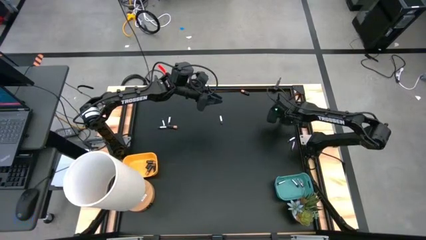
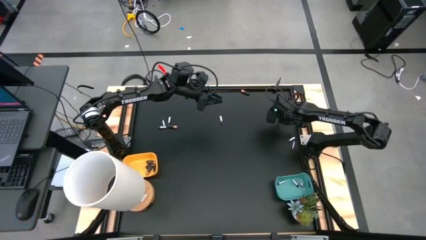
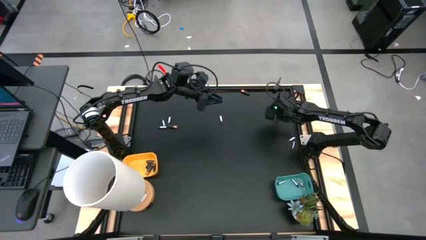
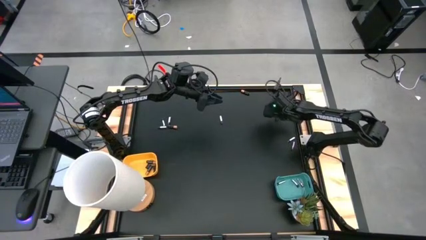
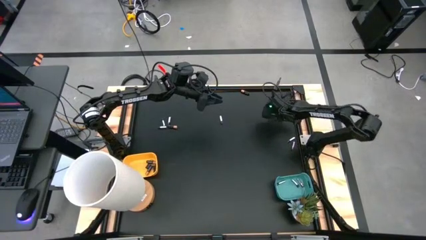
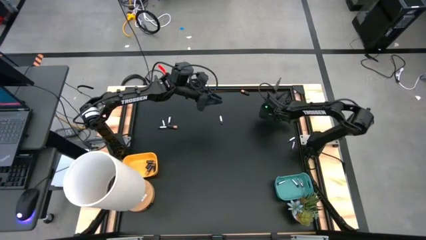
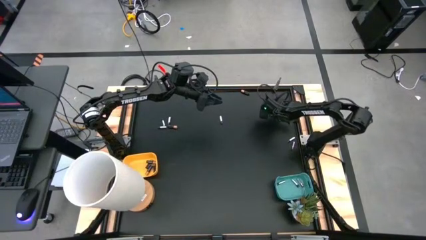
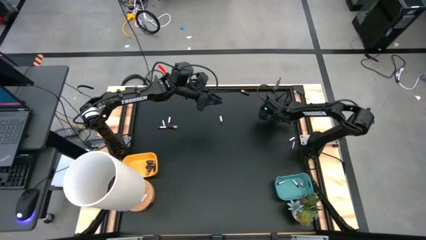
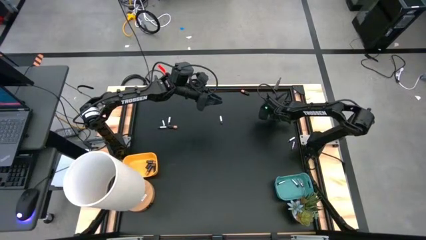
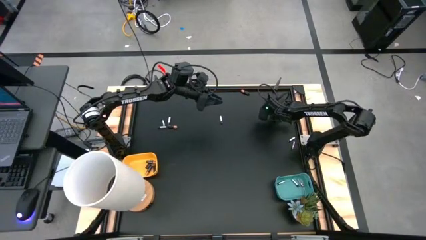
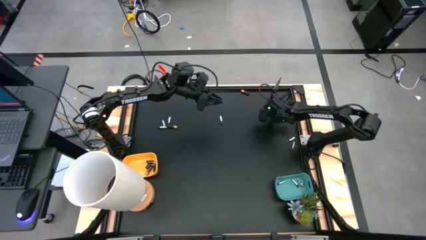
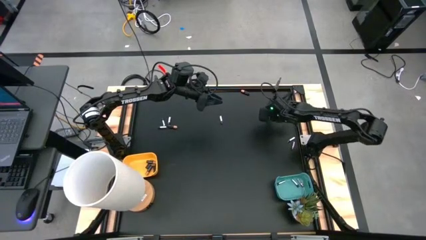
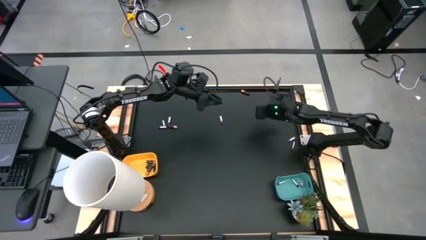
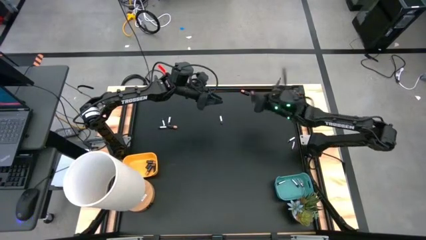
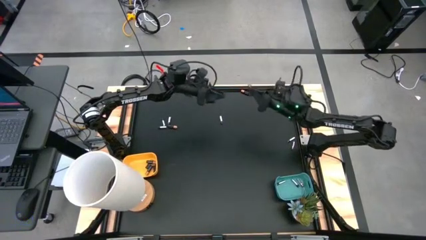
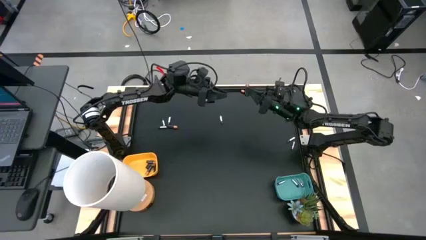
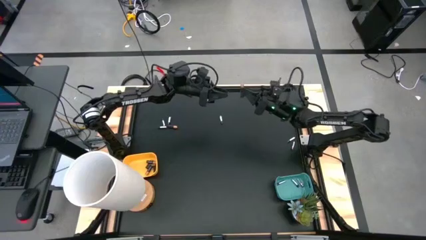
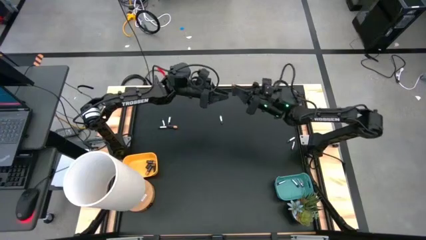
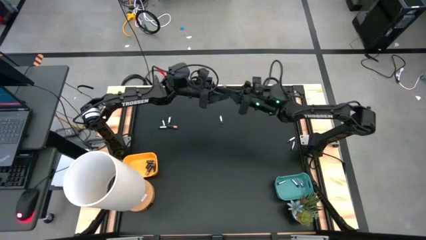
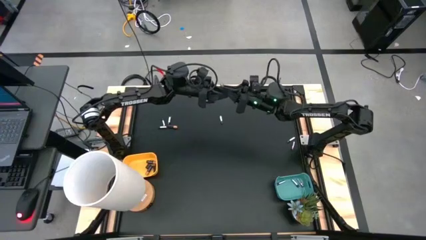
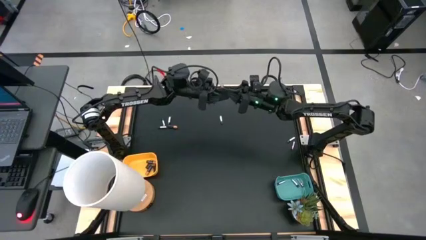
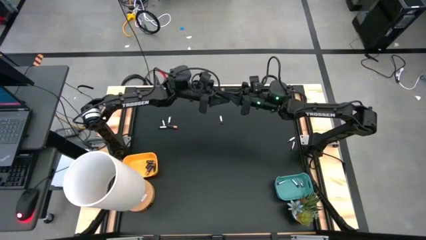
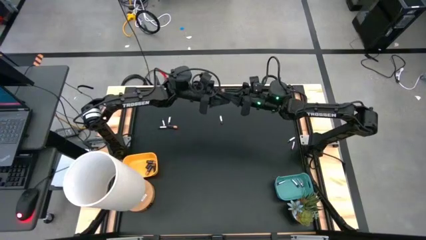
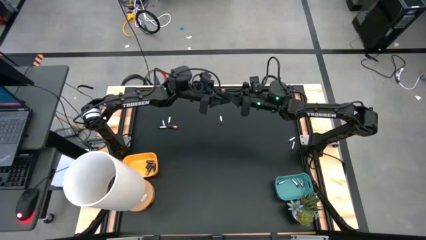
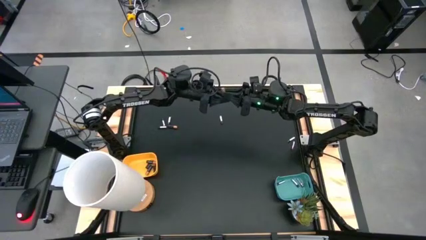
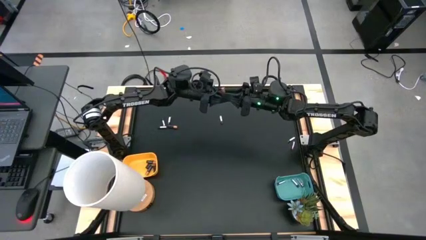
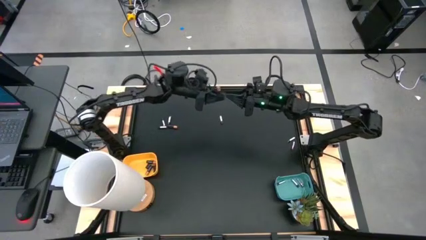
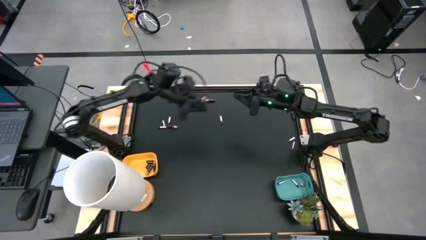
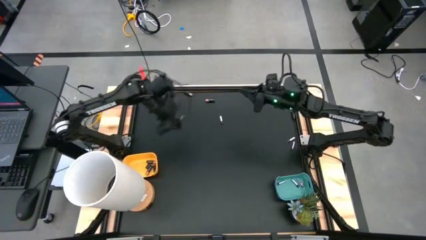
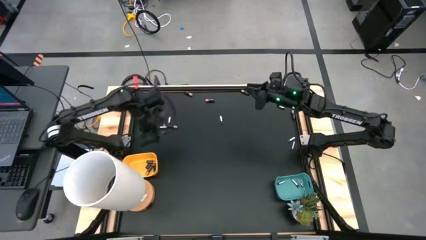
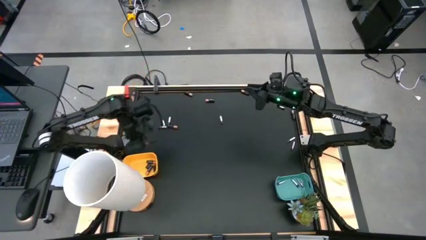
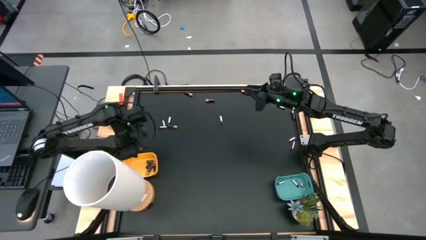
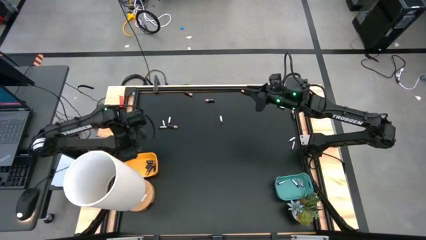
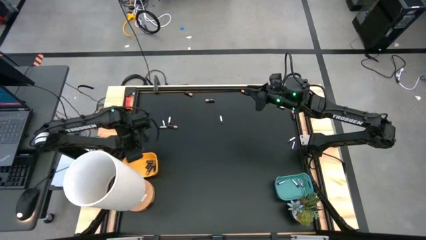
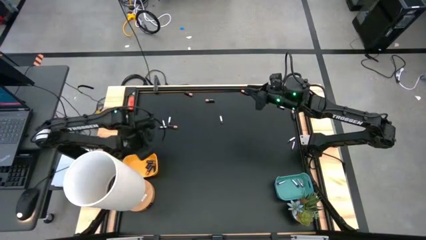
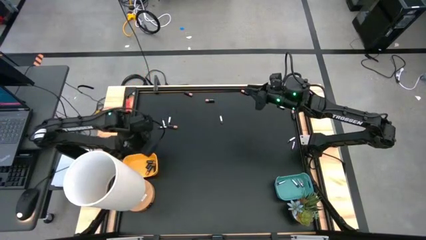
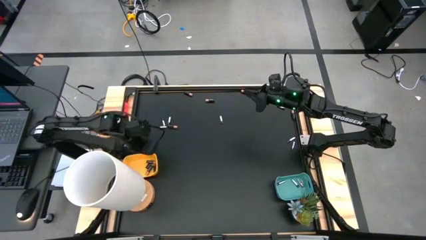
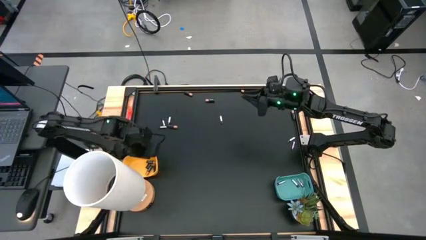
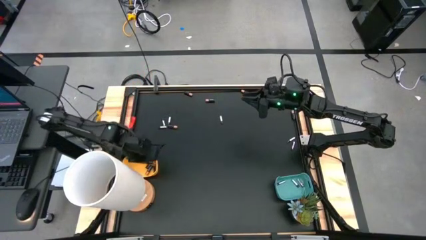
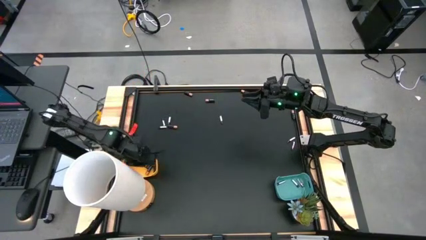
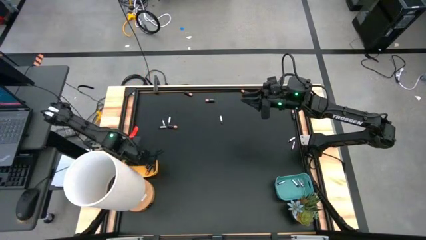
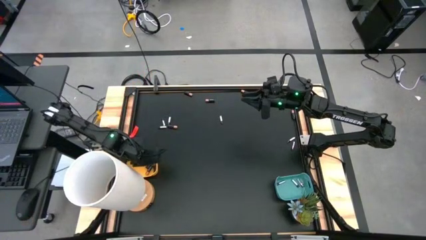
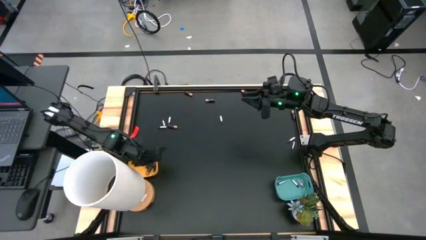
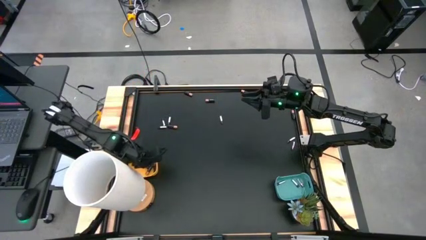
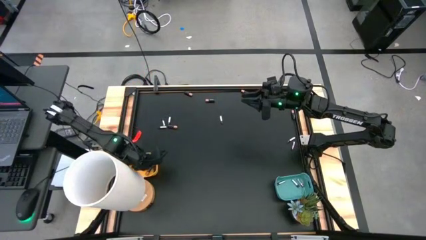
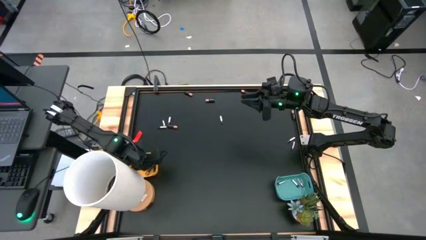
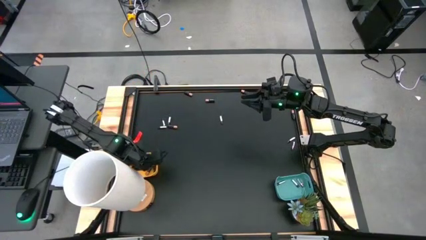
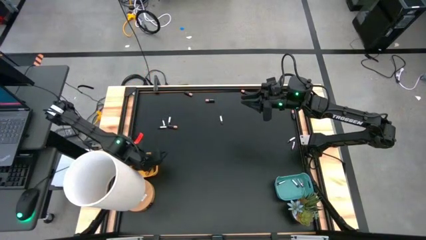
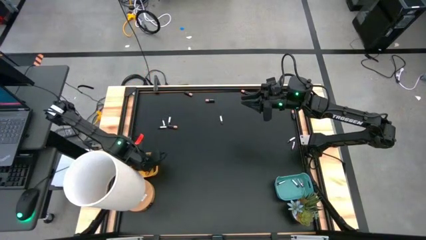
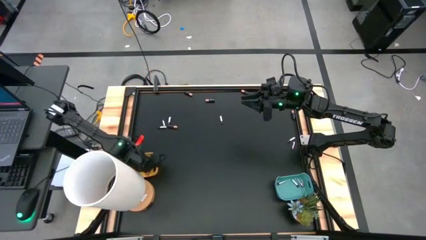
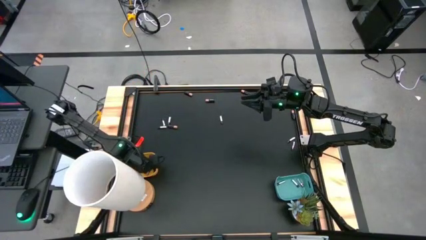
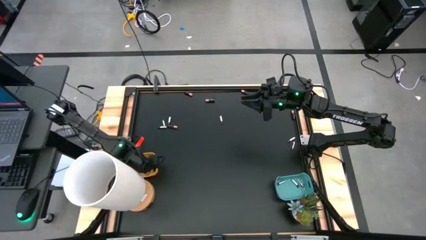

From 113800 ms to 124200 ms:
Task: Sort batteries
Put the black battery into the yellow bin

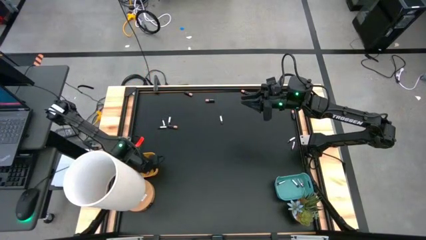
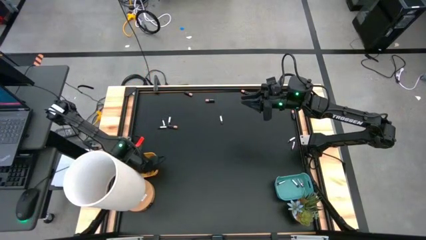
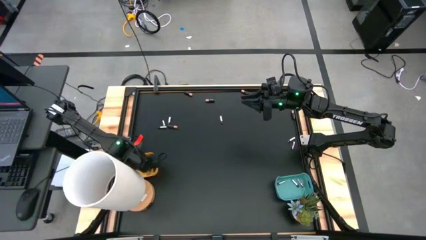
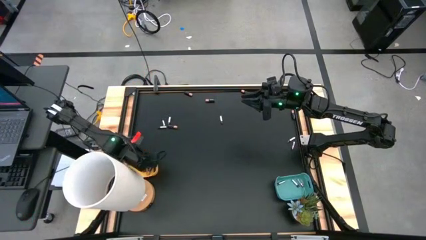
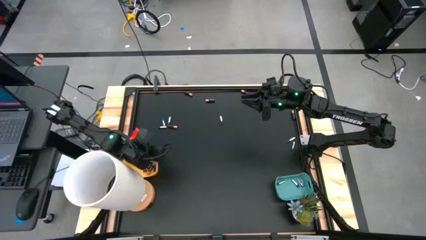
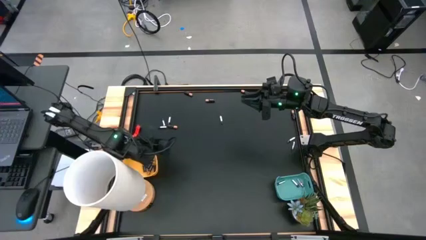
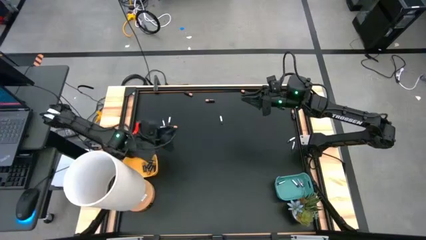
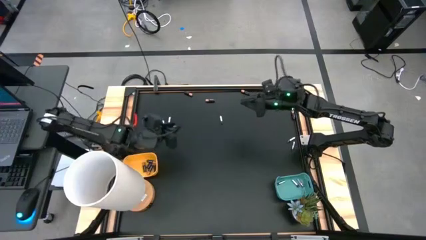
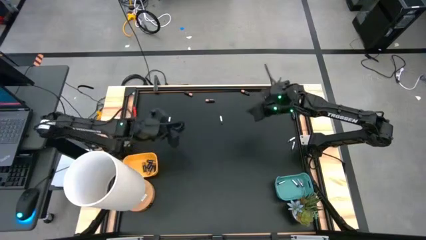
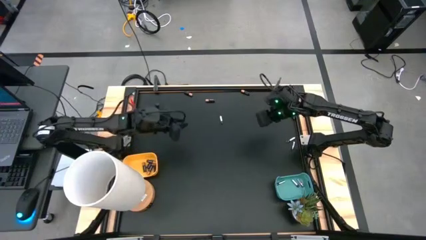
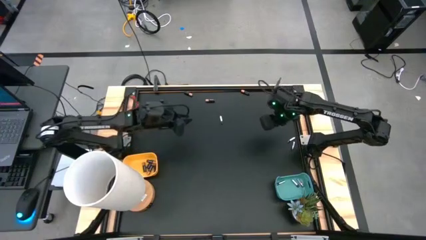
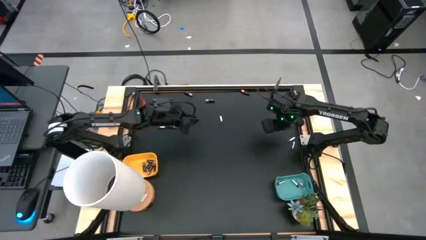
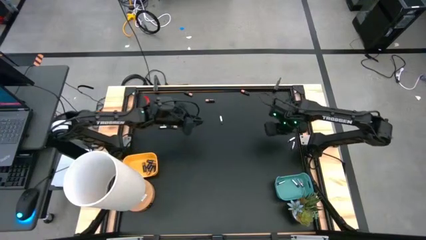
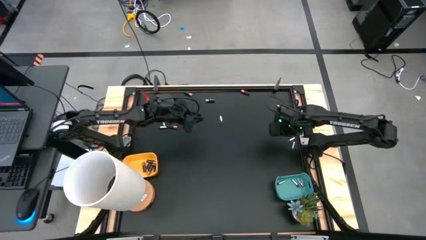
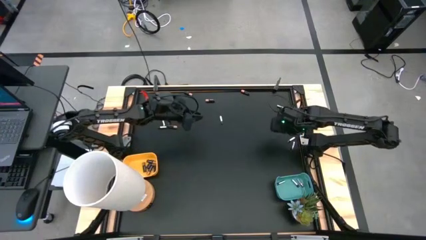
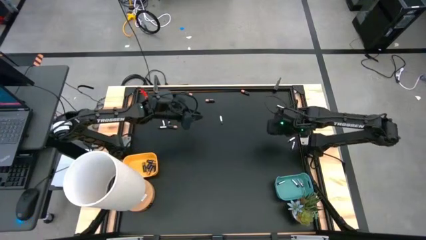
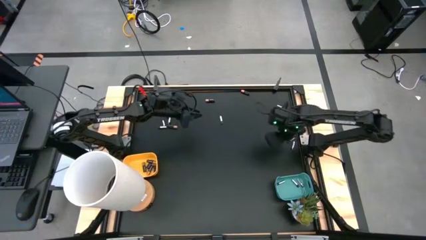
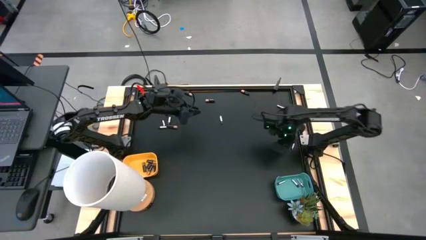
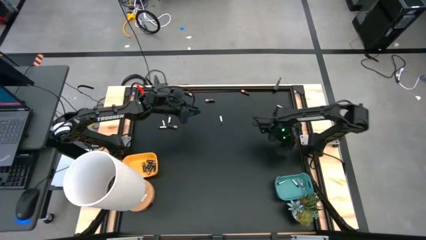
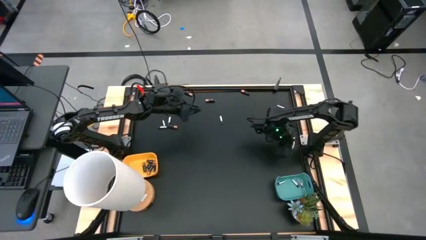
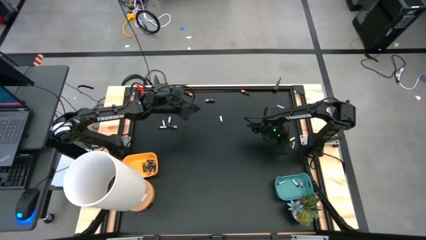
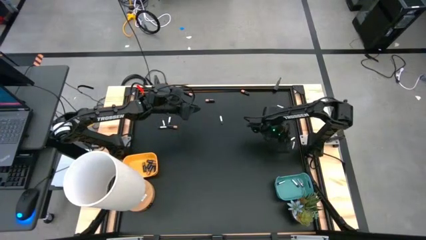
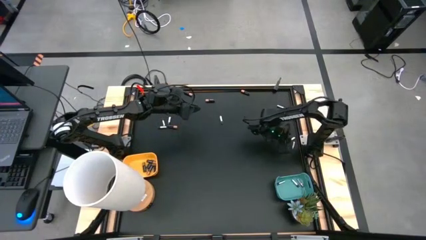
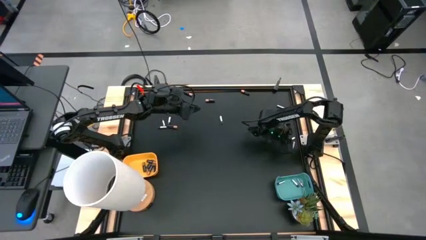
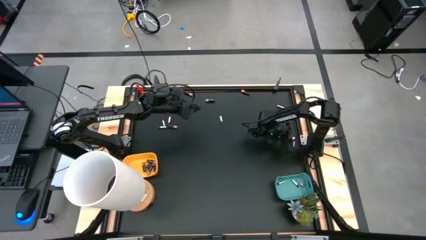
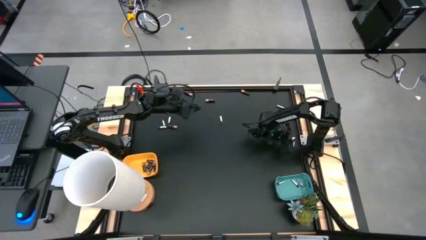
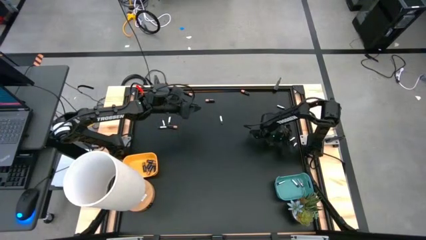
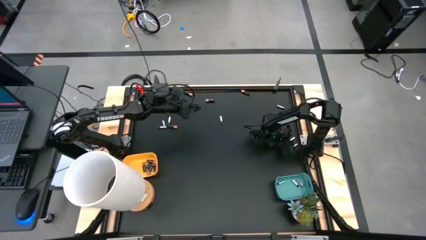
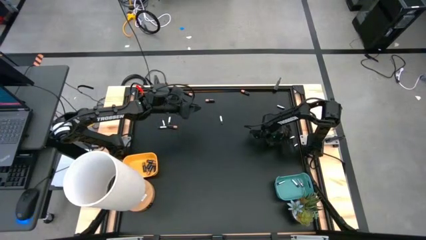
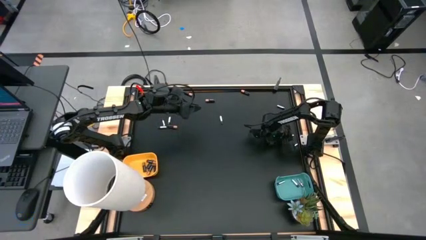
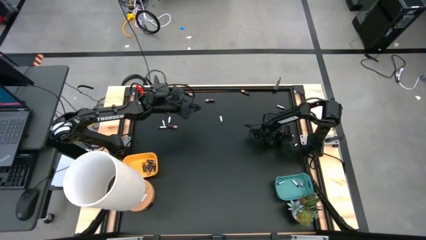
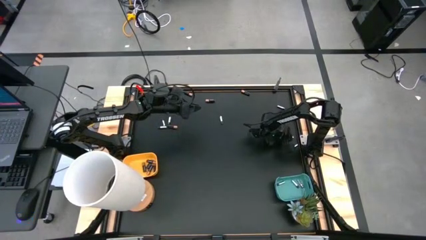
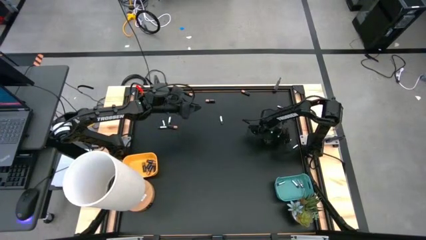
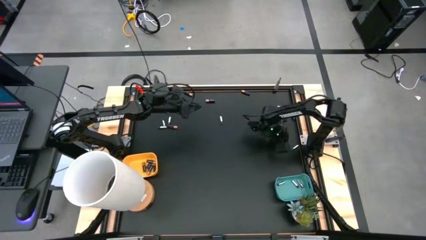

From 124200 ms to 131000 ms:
Put the silver battery into the green bin
